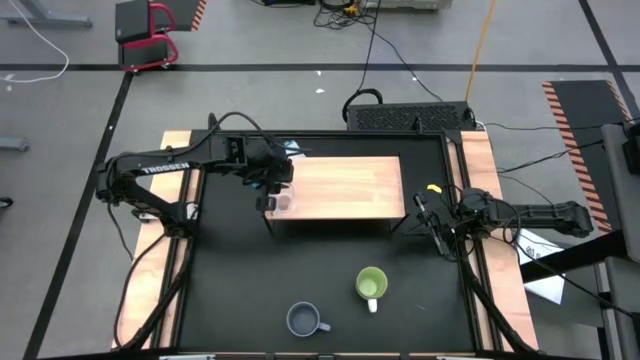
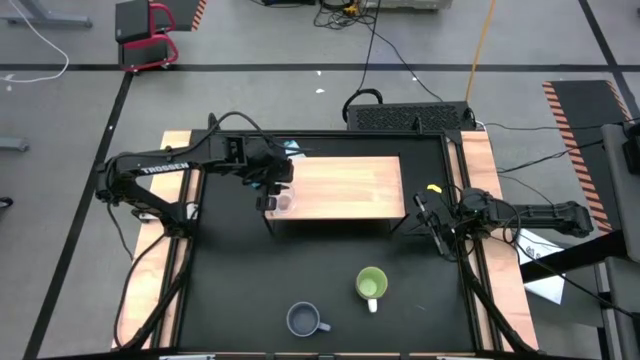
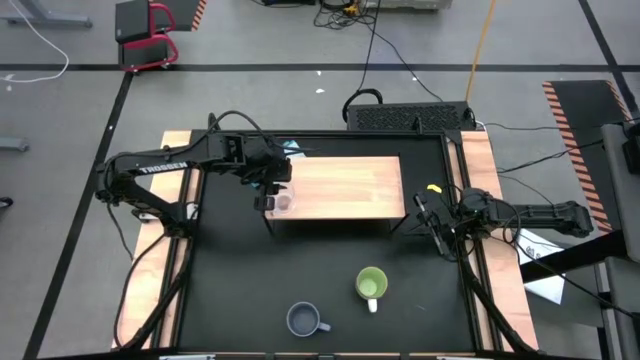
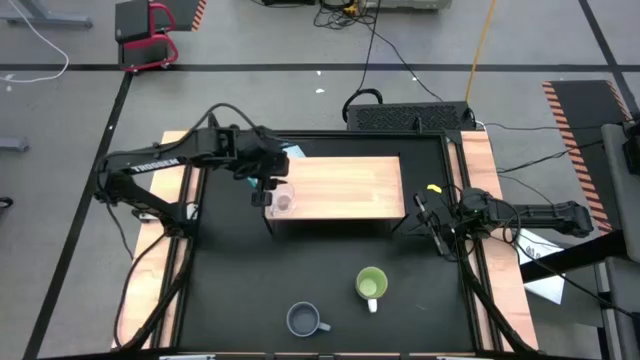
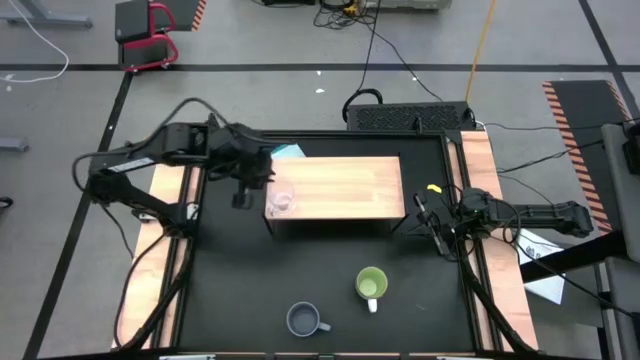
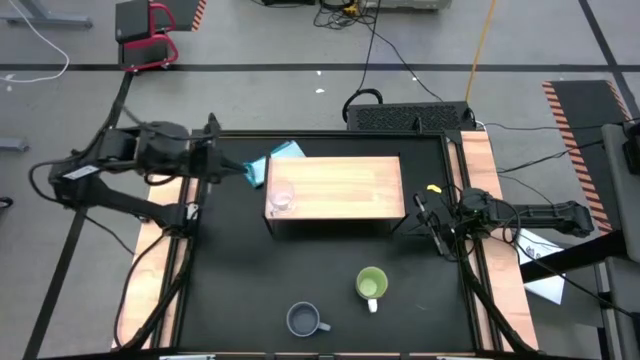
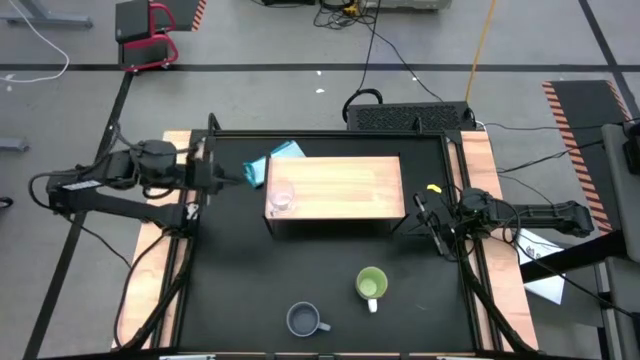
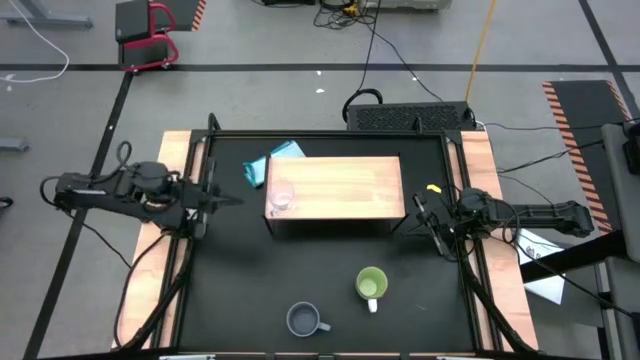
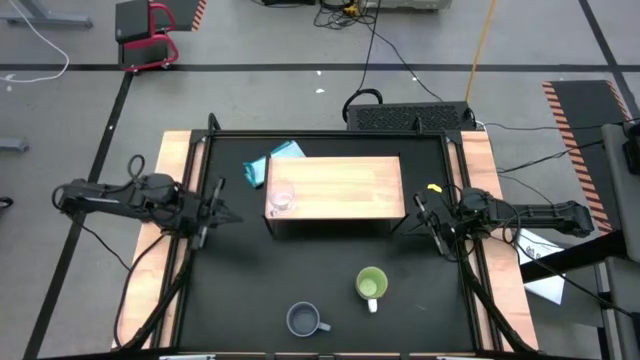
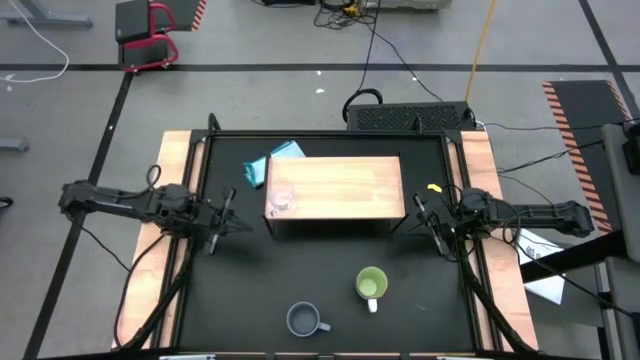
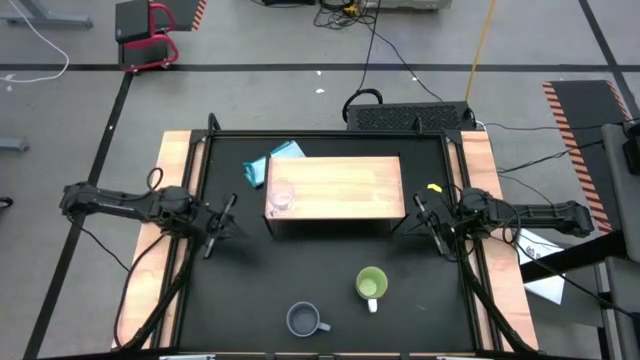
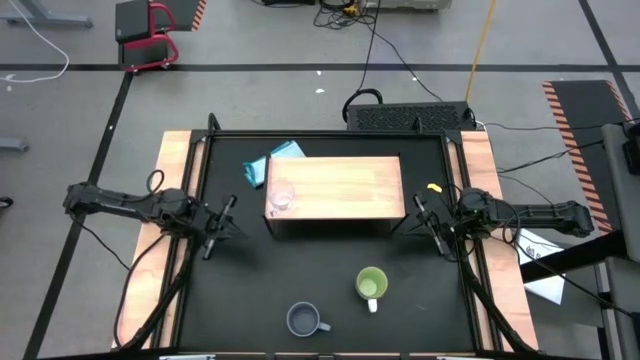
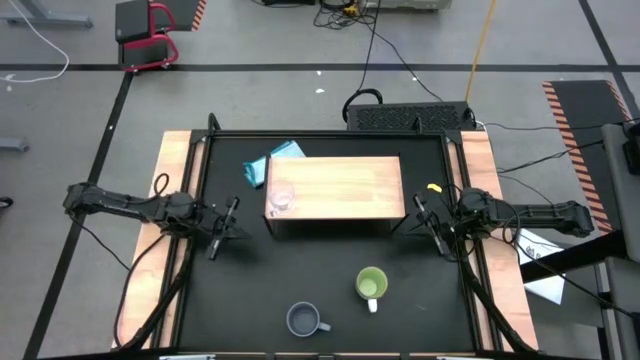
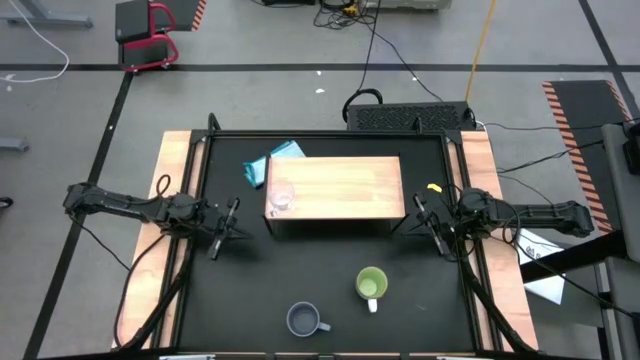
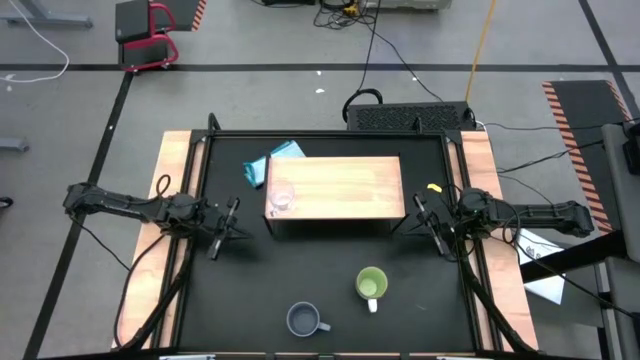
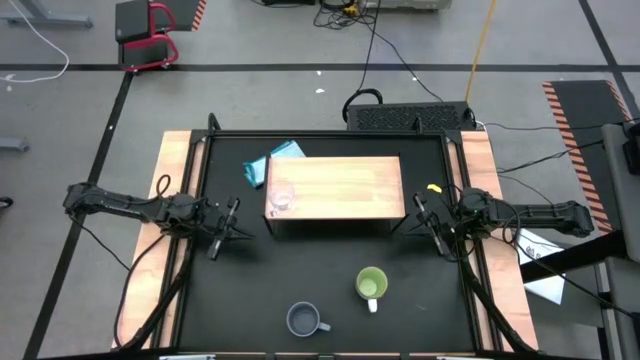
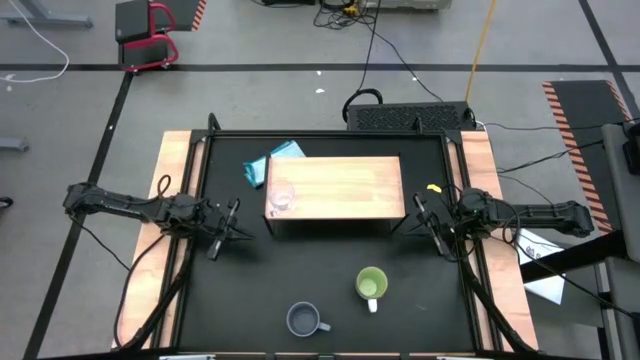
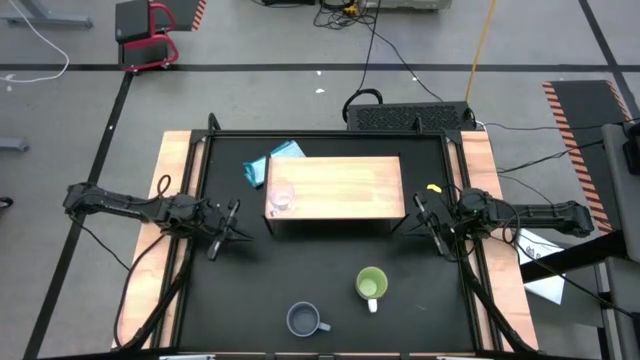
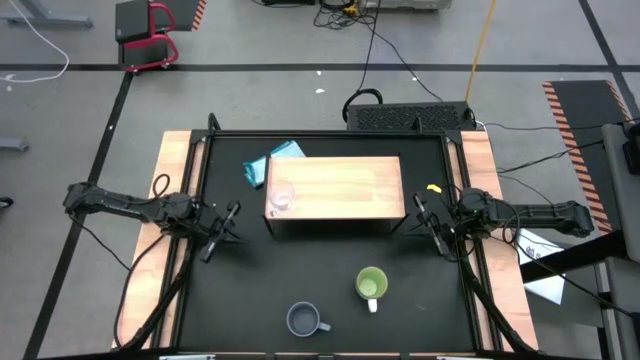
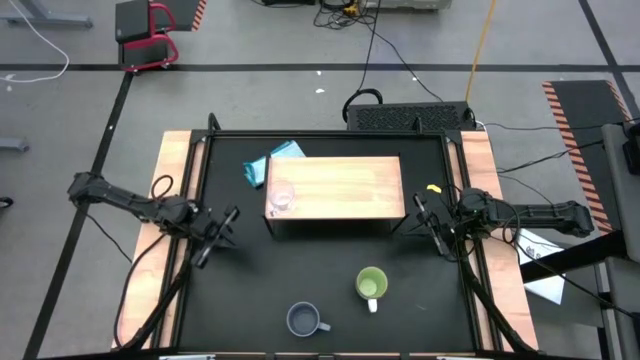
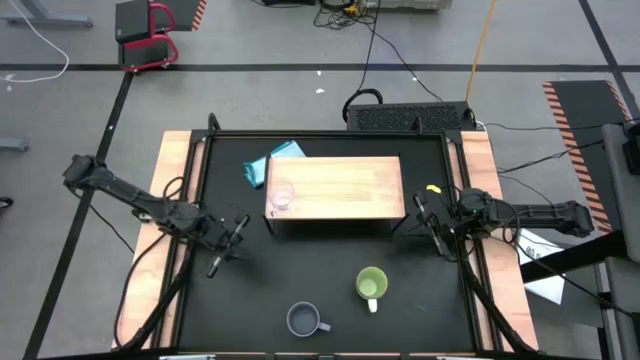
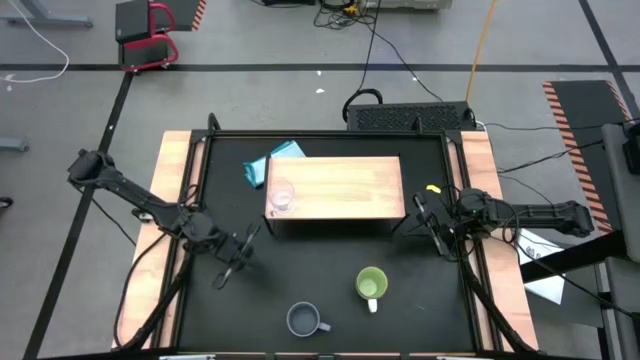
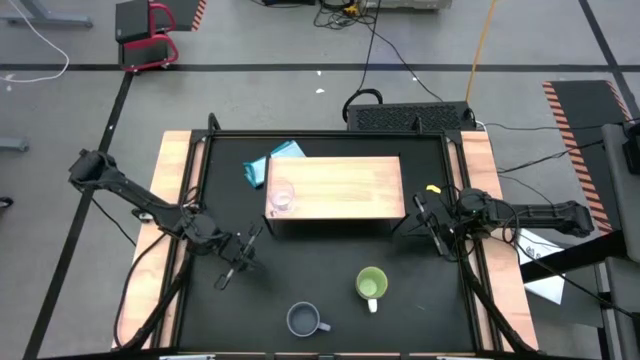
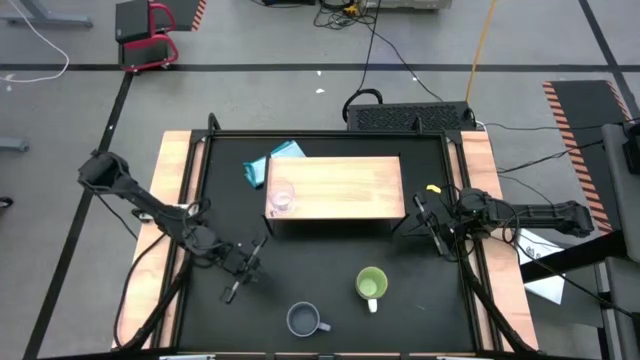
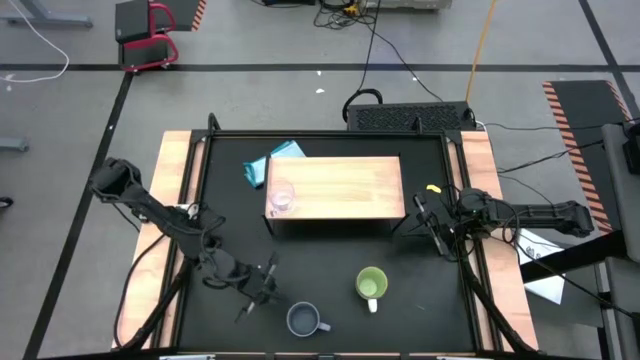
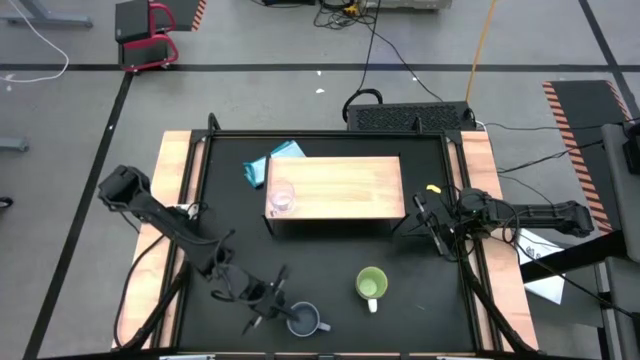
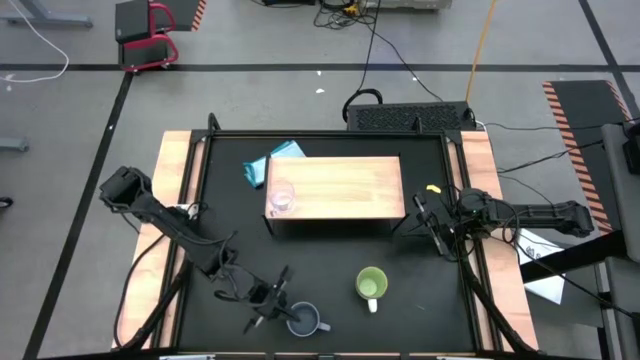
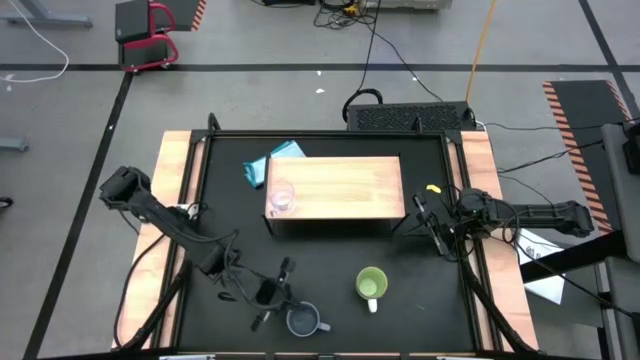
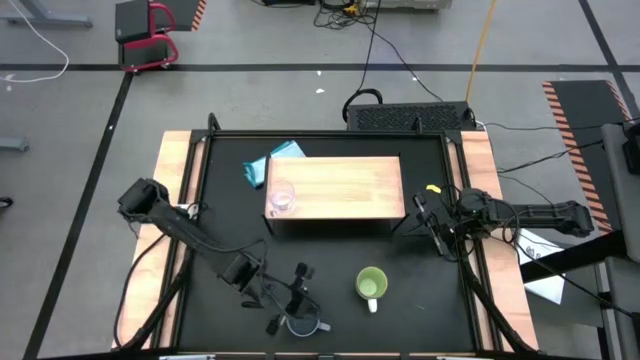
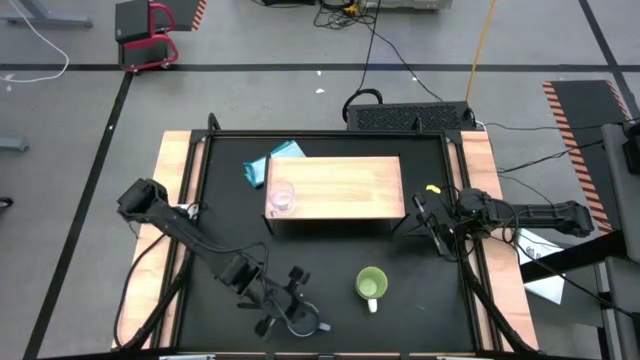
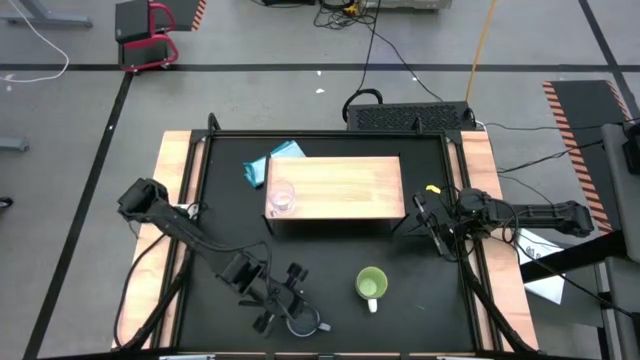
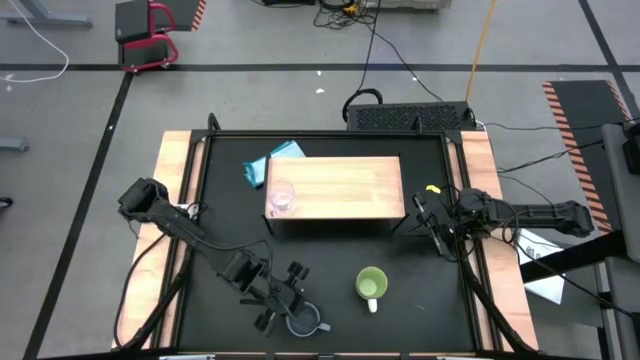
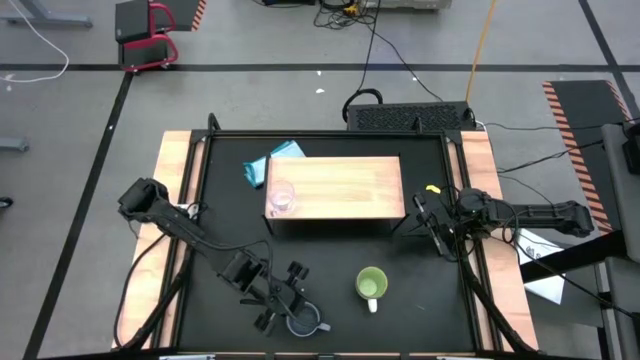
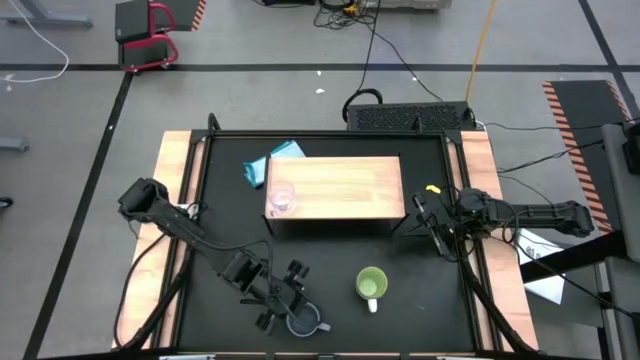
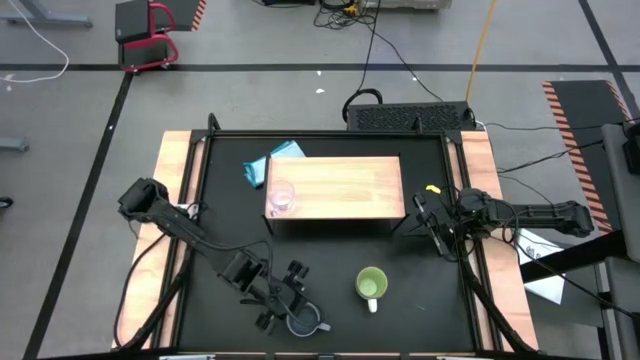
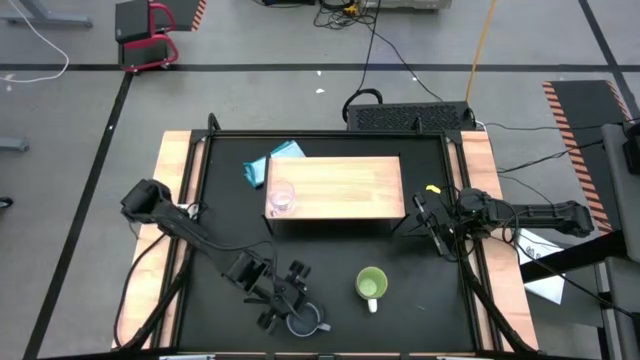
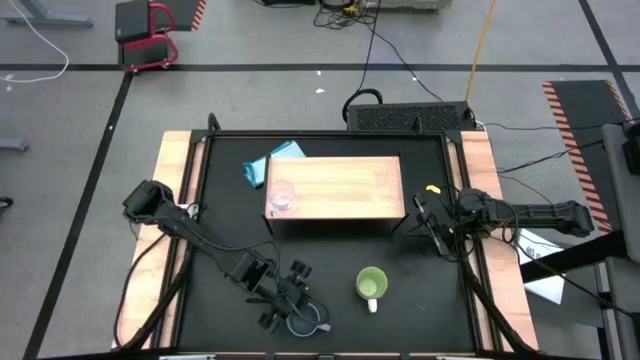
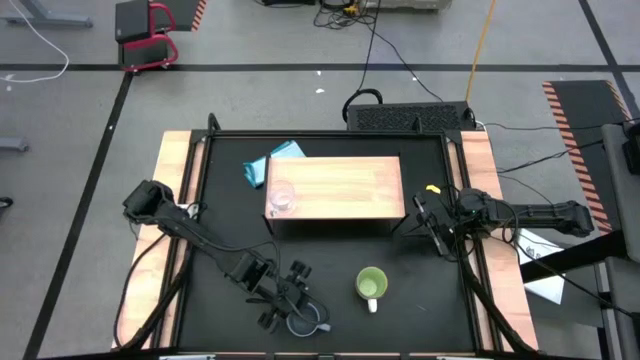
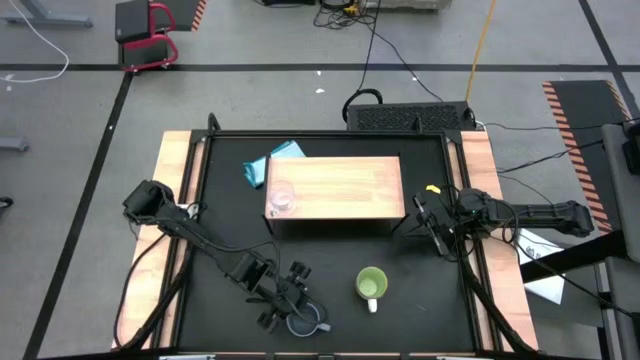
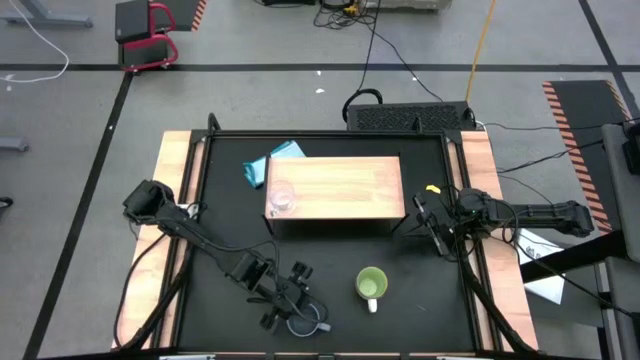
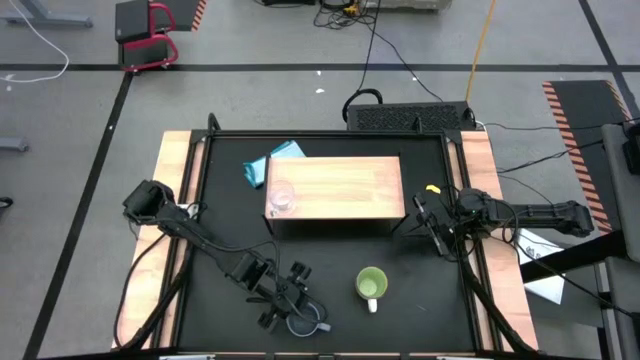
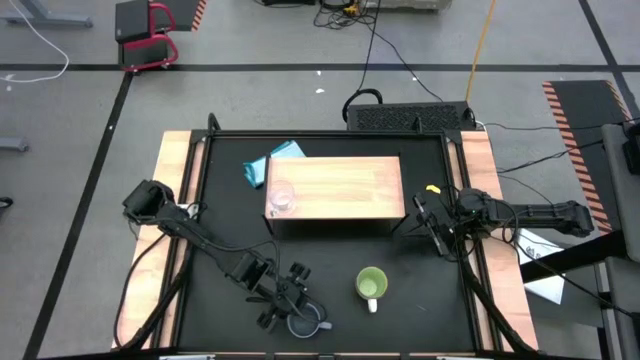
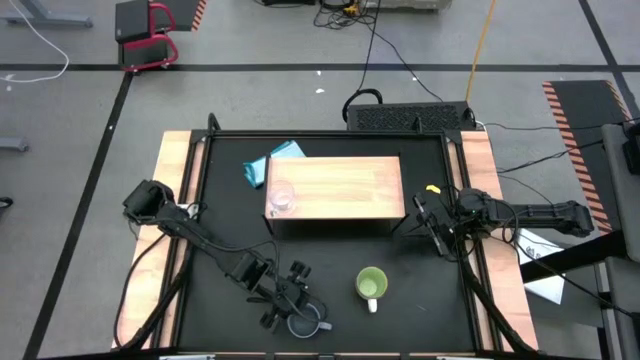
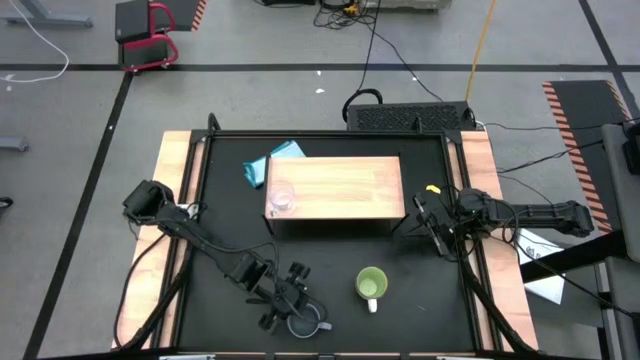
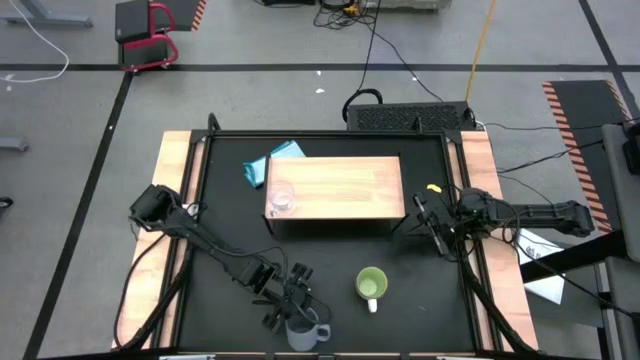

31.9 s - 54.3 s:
Task: Stack small to large cups/mugs on shelf
Put the gray mug on the shelf
